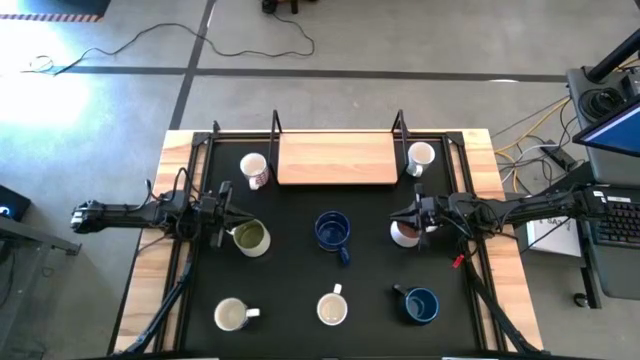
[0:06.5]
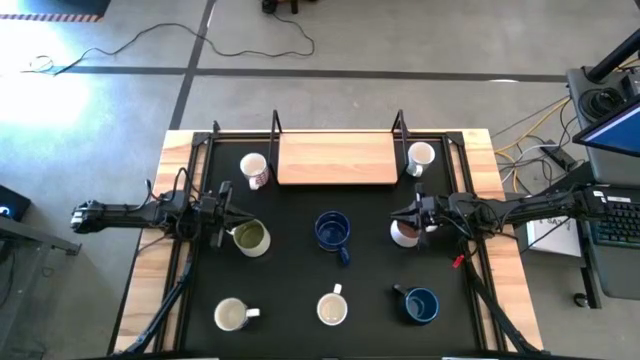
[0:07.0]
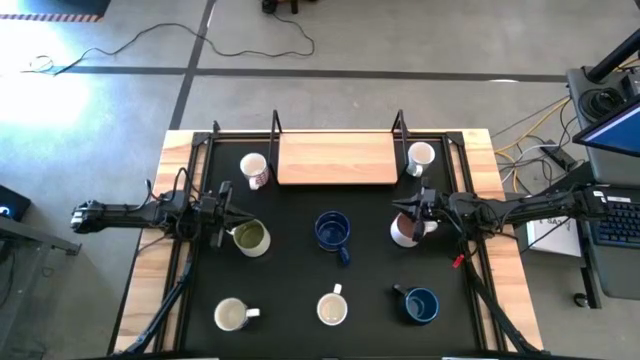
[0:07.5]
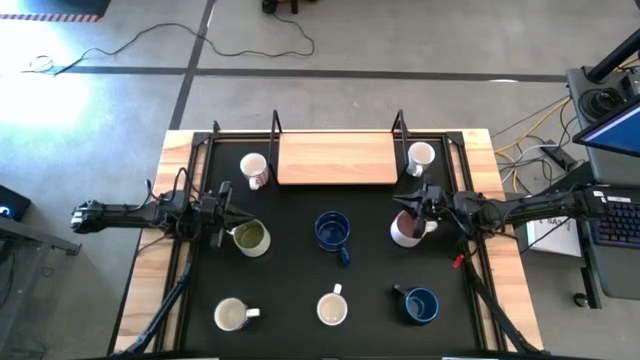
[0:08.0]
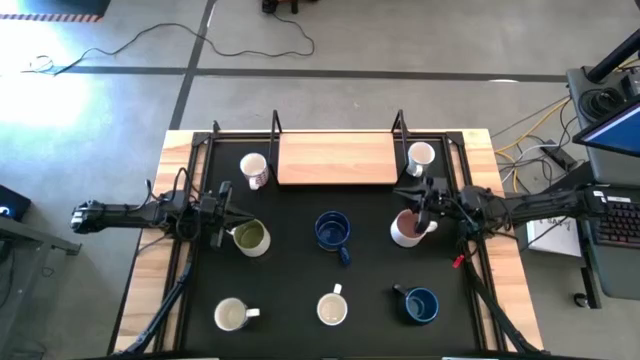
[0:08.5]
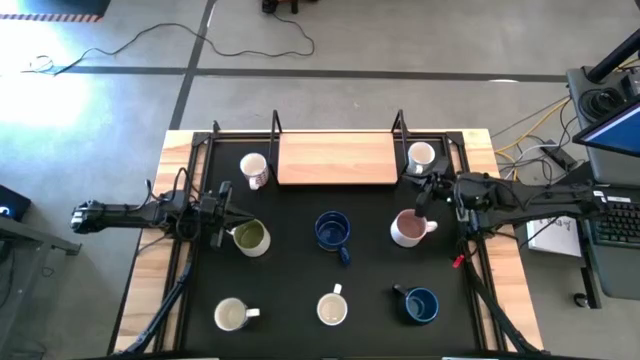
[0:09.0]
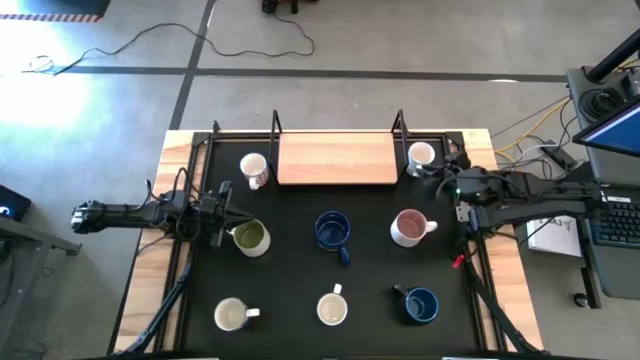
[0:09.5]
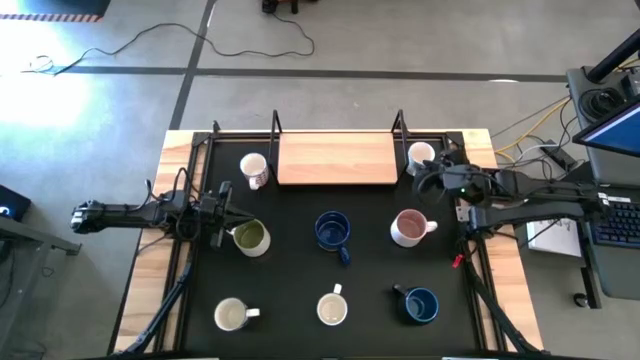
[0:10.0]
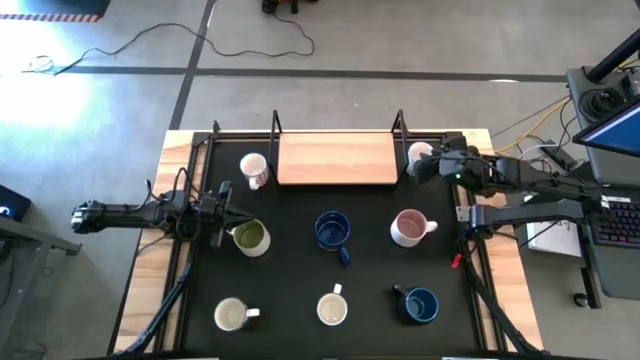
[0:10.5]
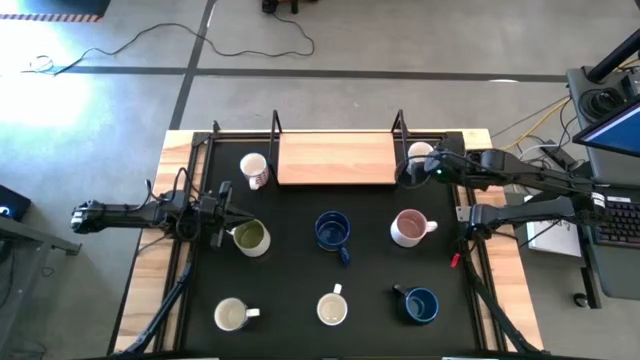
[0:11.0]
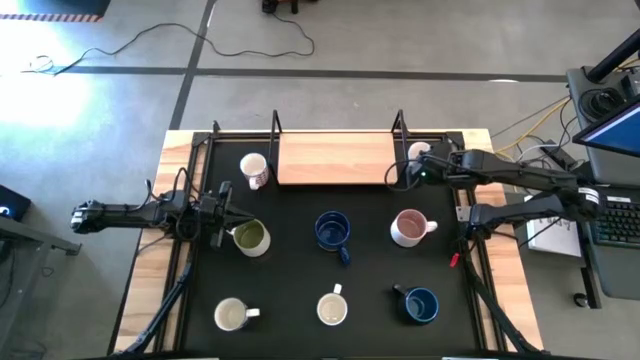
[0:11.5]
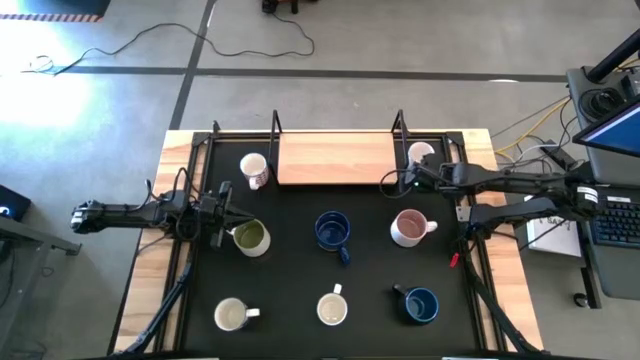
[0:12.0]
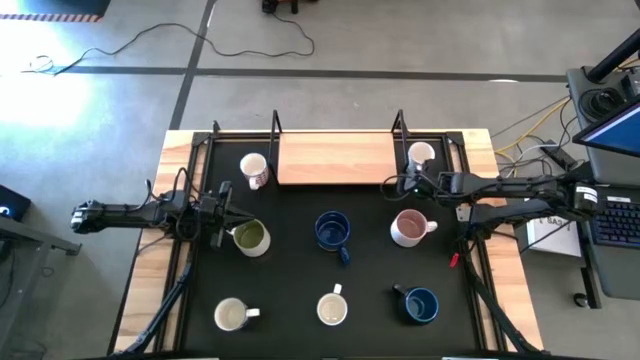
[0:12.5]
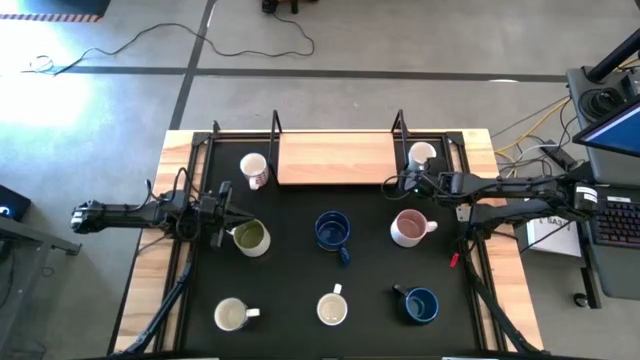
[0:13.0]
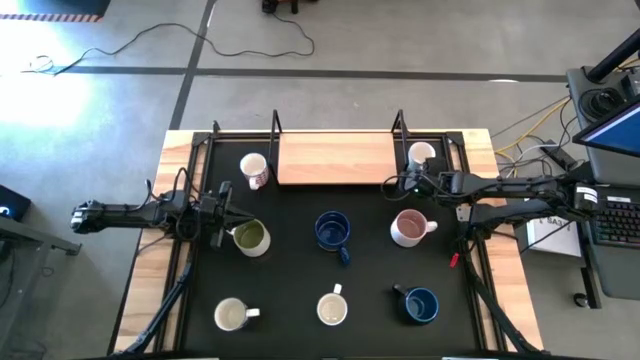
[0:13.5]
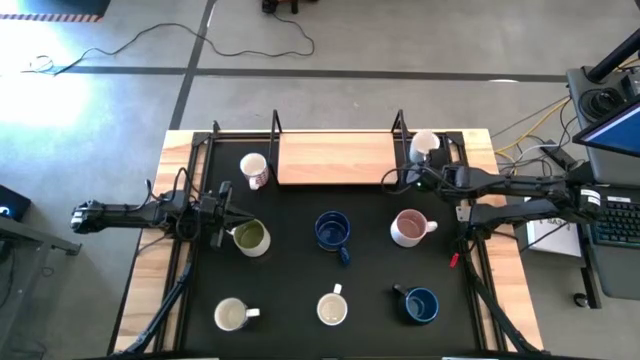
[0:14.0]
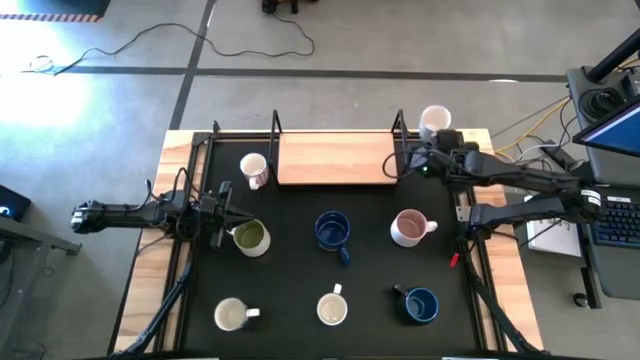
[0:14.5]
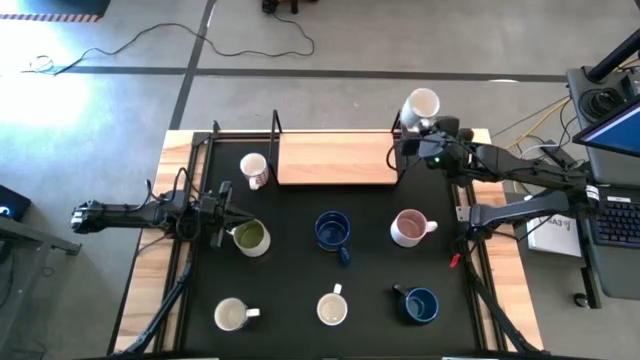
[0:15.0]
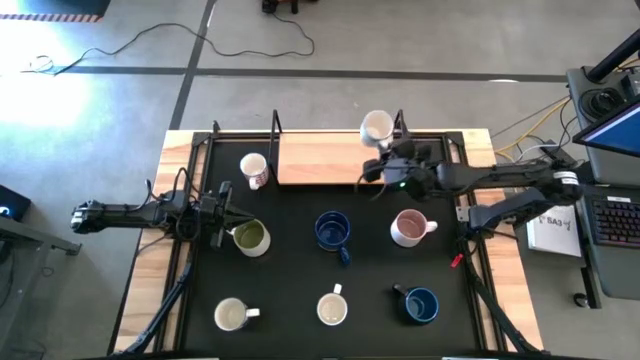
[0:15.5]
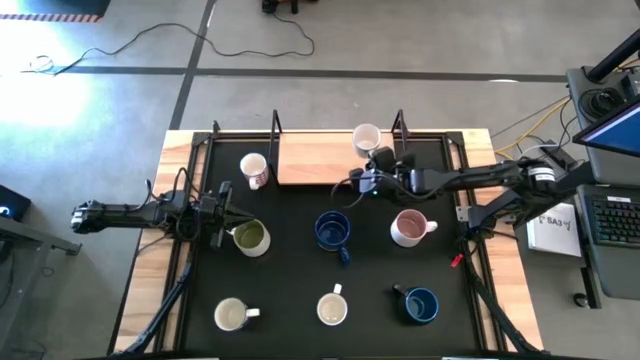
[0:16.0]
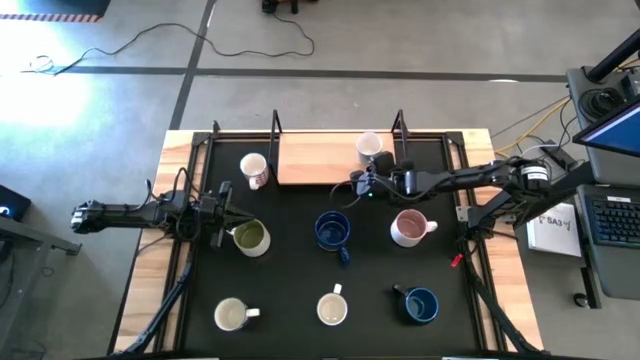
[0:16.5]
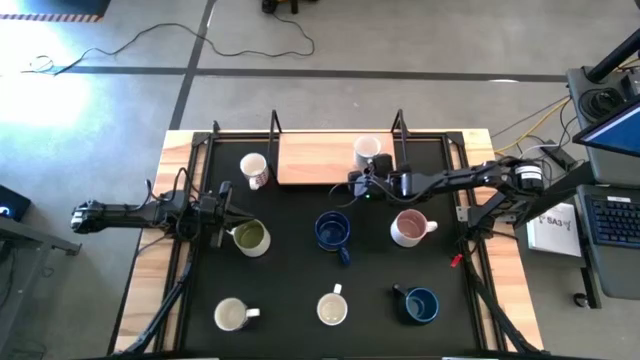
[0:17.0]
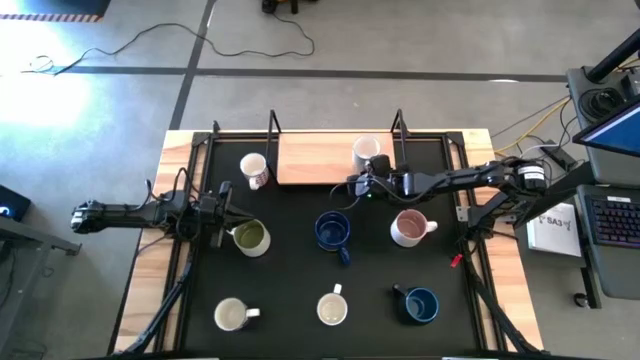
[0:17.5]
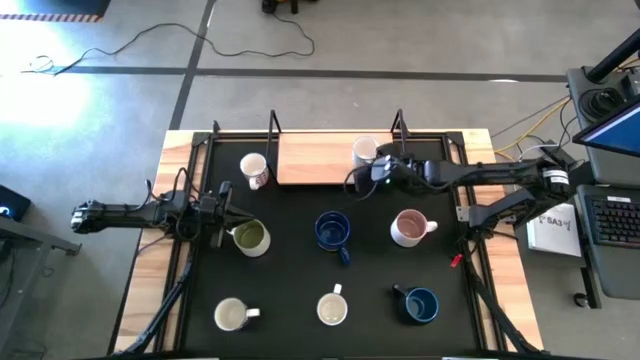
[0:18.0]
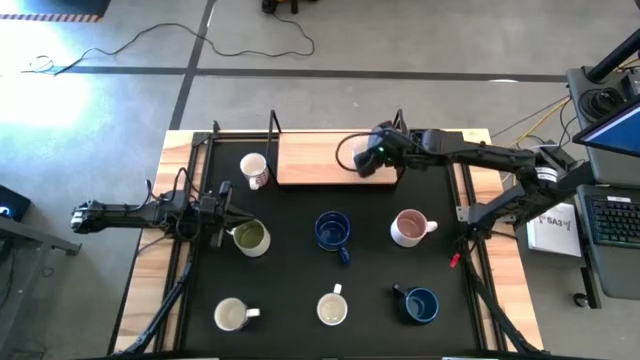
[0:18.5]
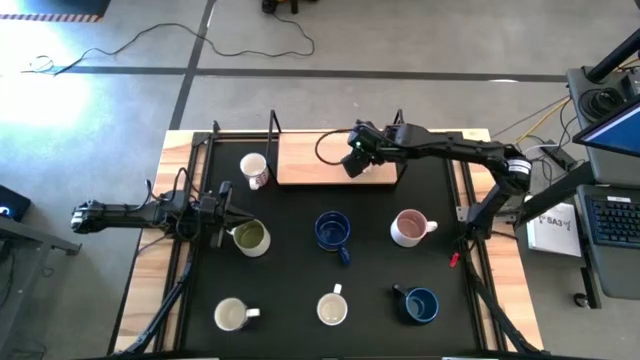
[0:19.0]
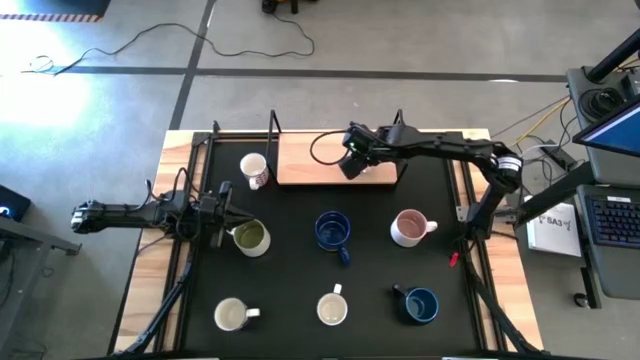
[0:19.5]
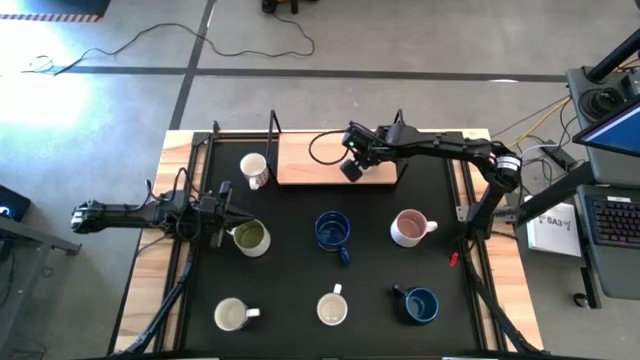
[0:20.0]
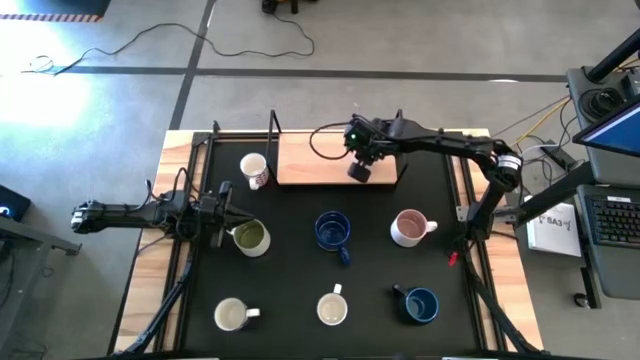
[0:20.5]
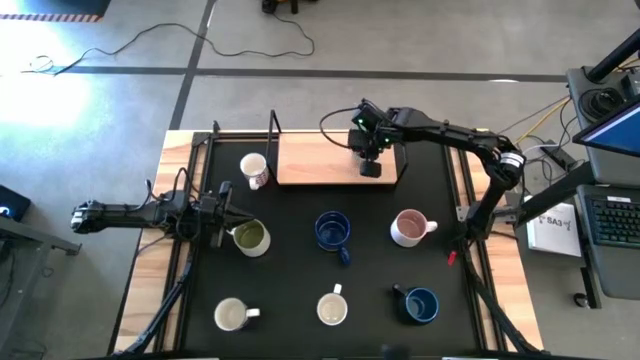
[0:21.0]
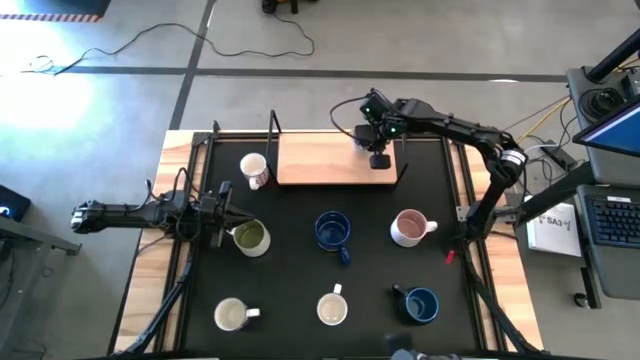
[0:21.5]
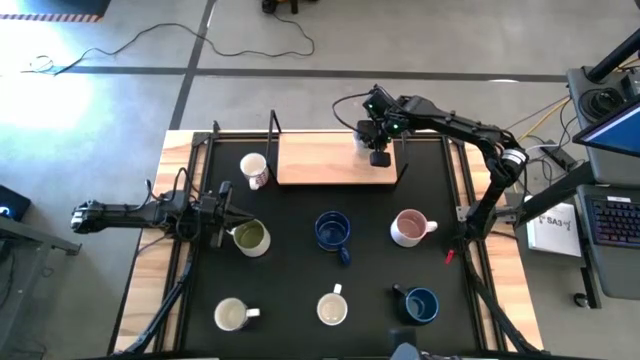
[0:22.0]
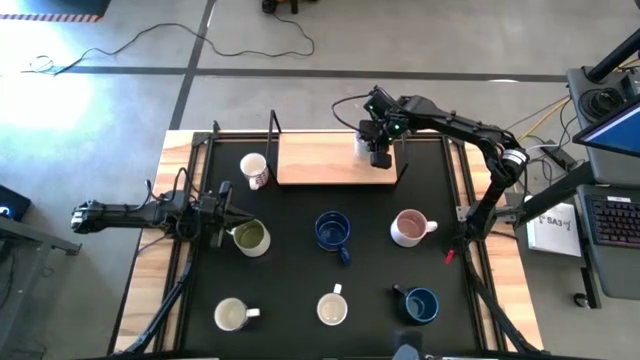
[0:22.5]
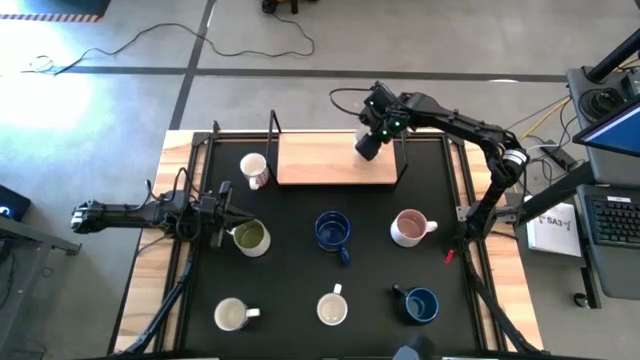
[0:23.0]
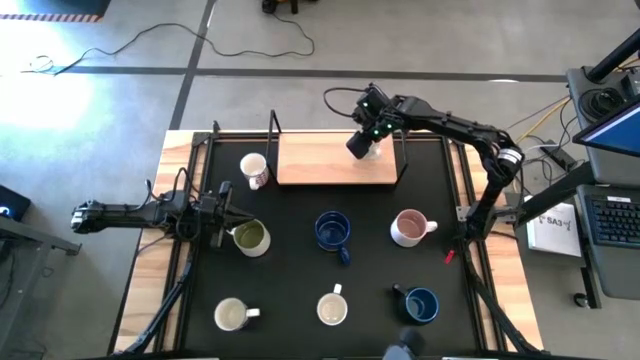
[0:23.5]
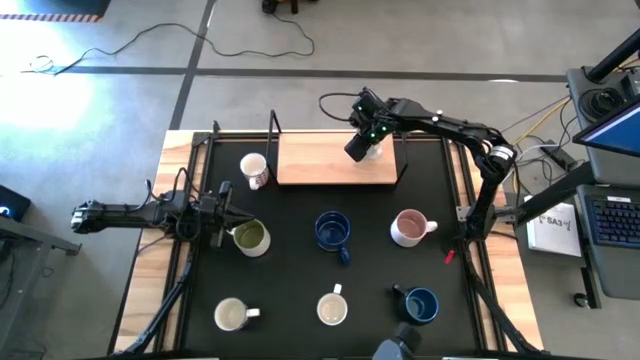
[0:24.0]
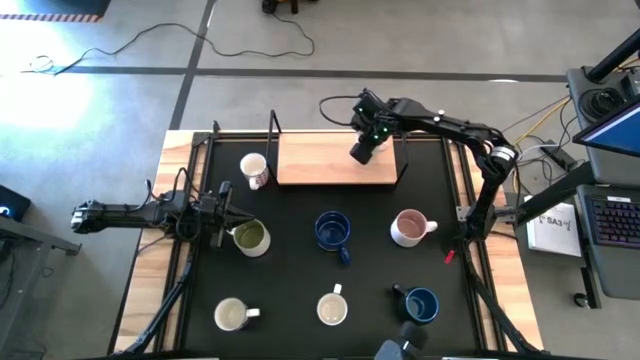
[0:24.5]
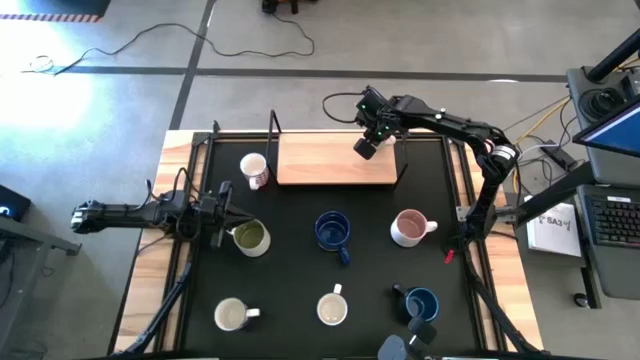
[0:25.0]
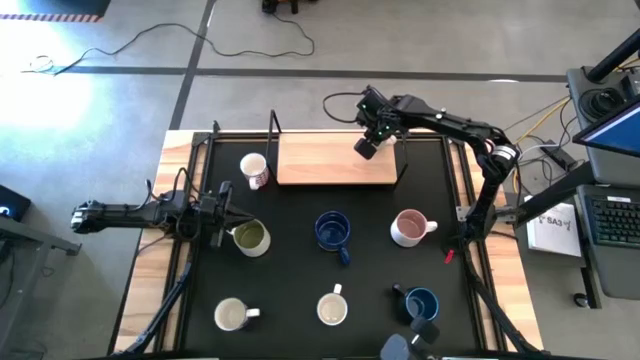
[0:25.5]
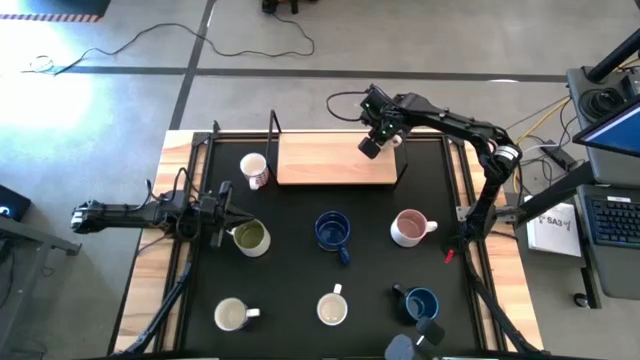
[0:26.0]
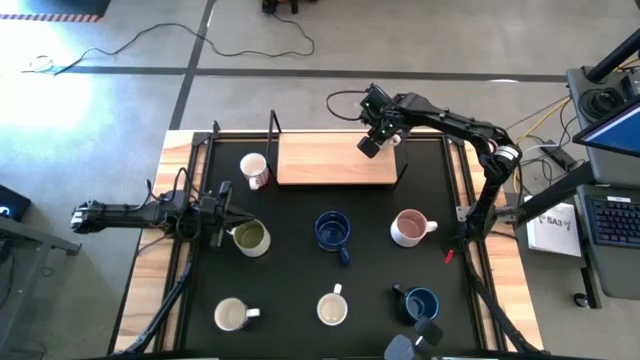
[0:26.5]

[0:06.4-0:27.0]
Task: Place coffee mugs
Put the light blue mug on the shelf
